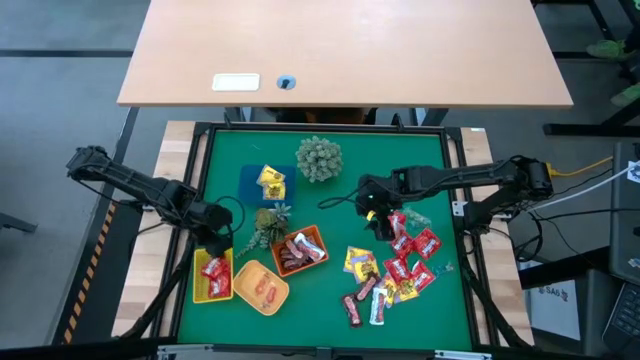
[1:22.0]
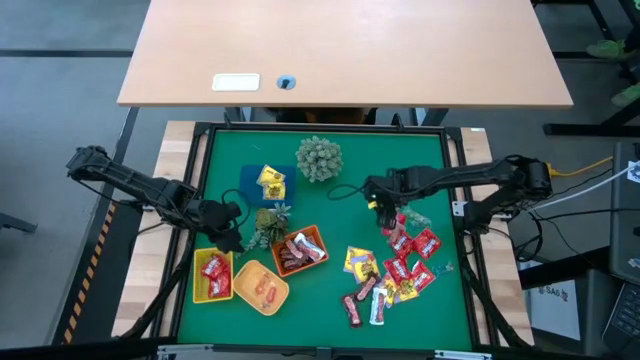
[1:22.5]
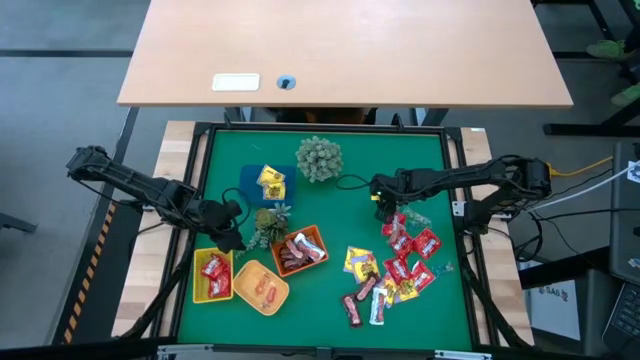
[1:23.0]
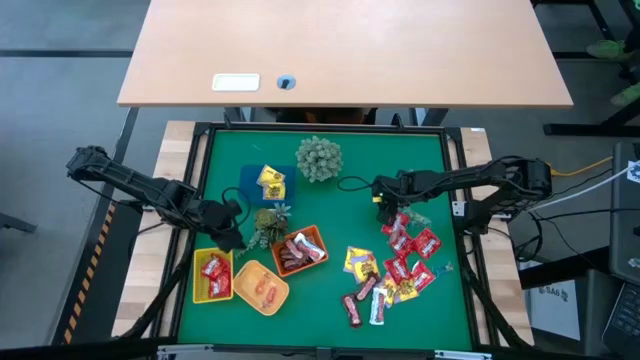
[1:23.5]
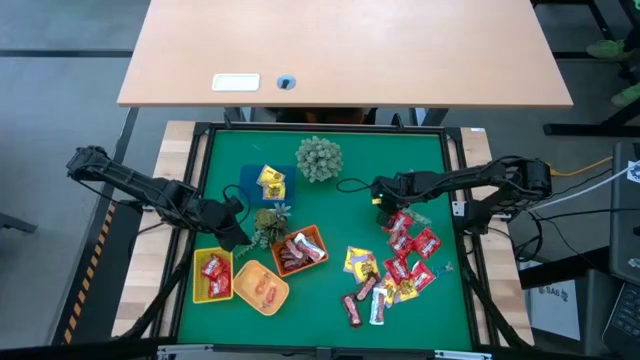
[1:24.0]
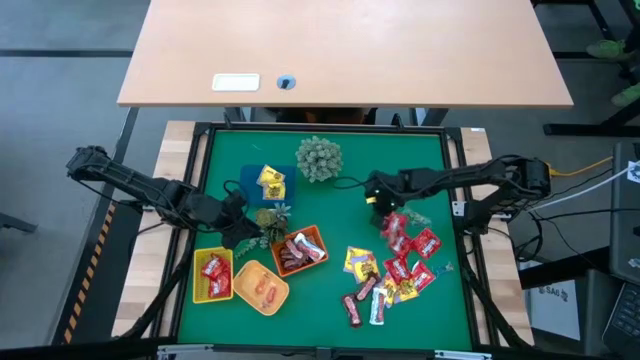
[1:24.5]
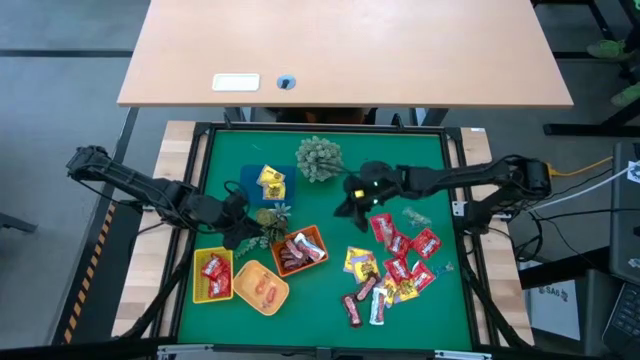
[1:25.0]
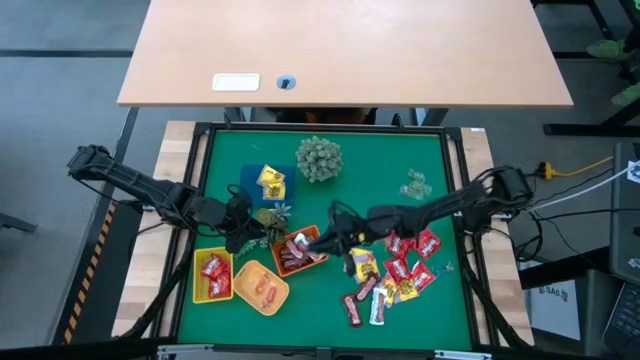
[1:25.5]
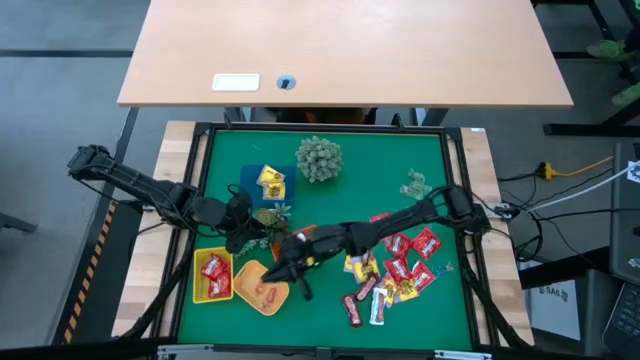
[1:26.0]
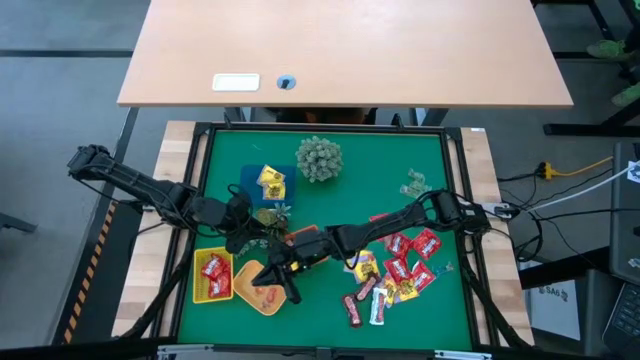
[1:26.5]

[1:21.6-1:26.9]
Task: Sort candy
Put the blue gummy into the light orange bin

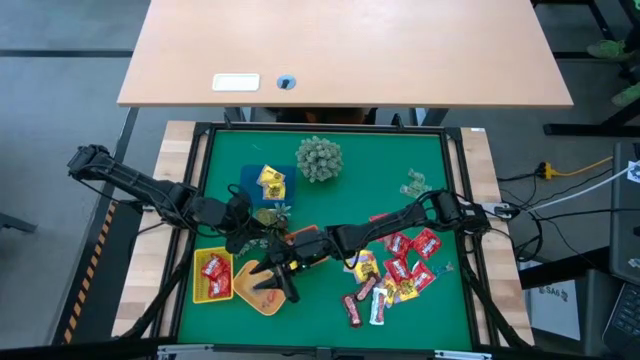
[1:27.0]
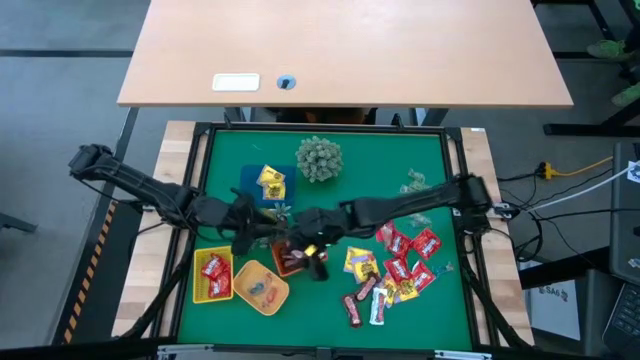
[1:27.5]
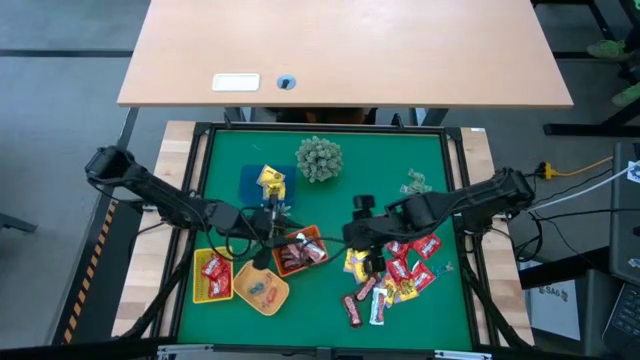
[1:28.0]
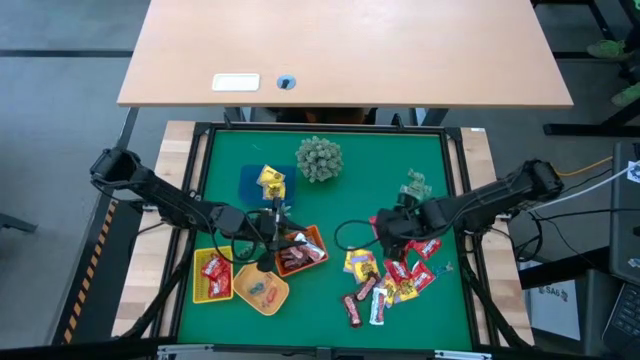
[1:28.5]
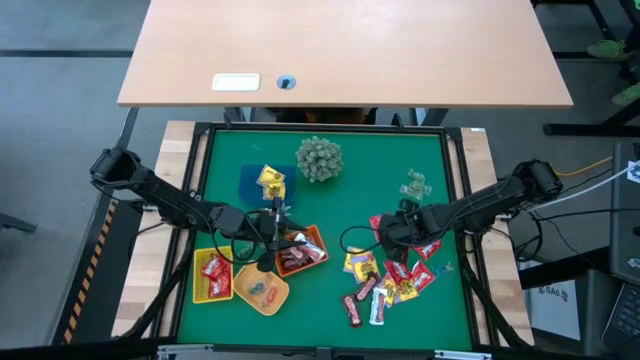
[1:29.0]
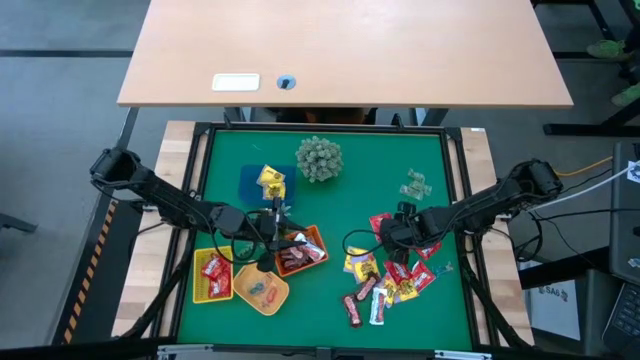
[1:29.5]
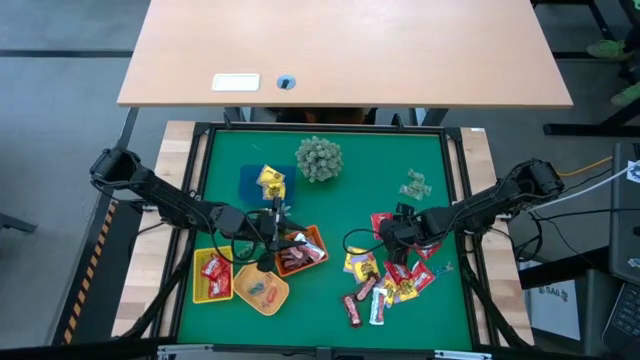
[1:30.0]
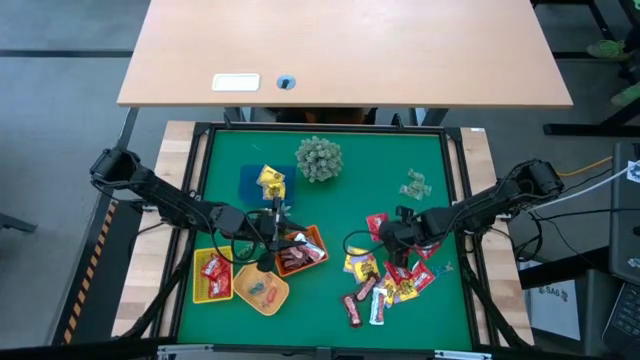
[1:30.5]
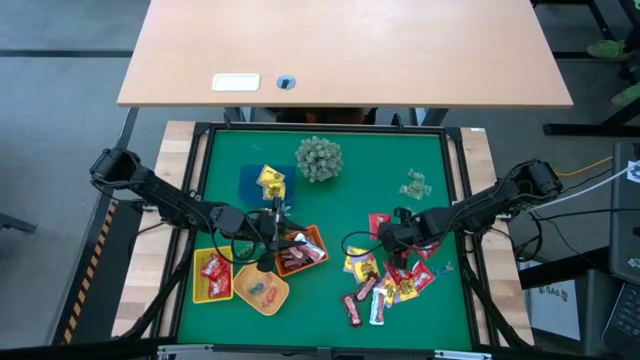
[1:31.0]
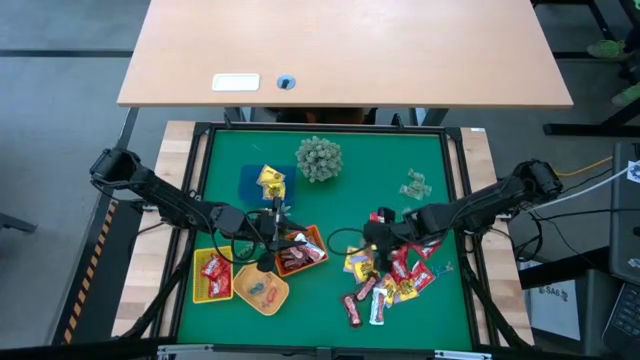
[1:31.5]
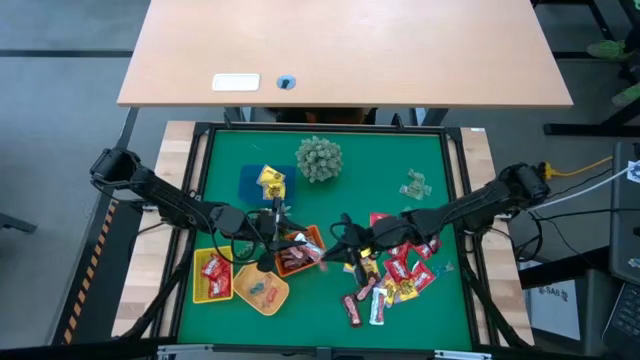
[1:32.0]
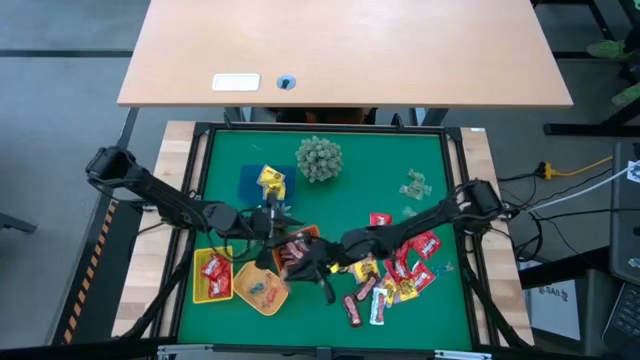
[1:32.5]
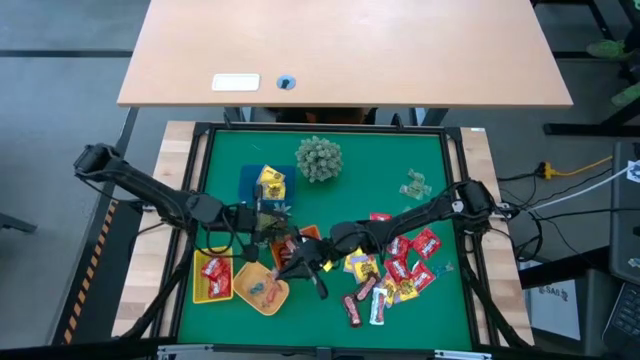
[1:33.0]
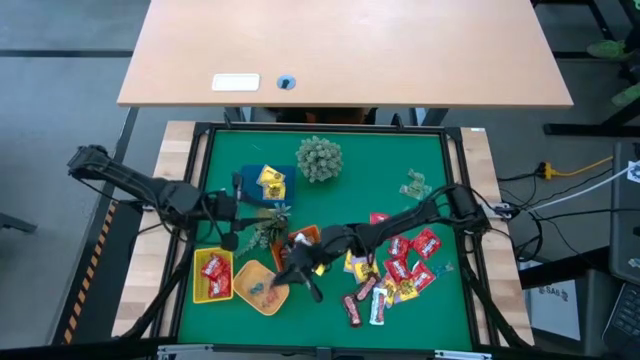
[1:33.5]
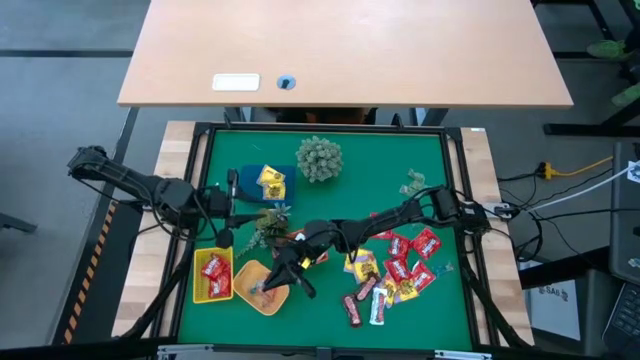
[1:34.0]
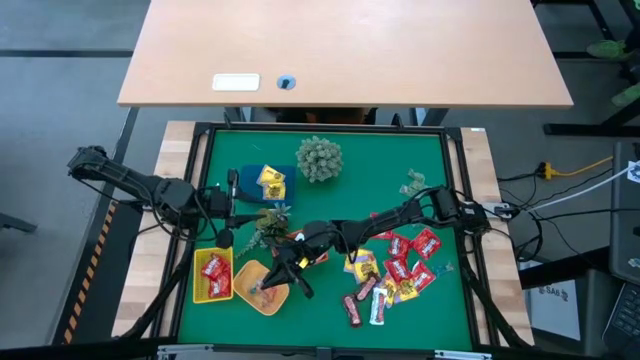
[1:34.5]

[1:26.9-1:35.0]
Put the orange gummy into the light orange bin

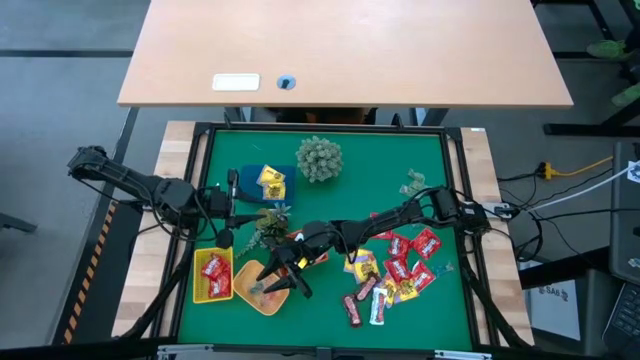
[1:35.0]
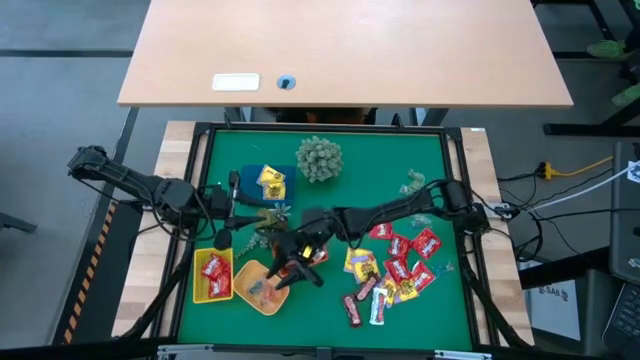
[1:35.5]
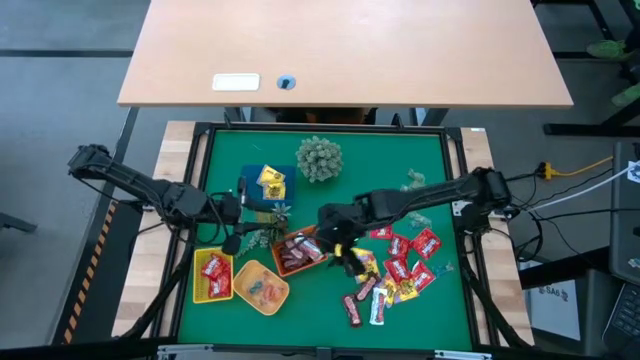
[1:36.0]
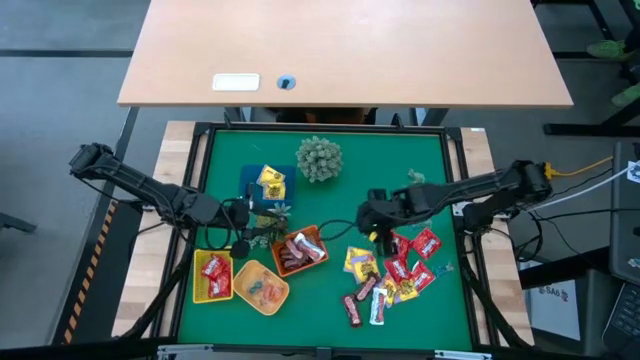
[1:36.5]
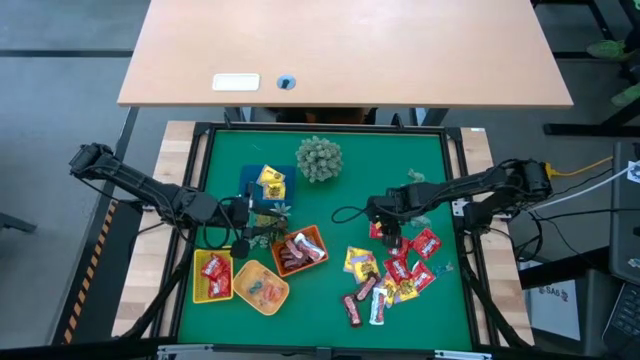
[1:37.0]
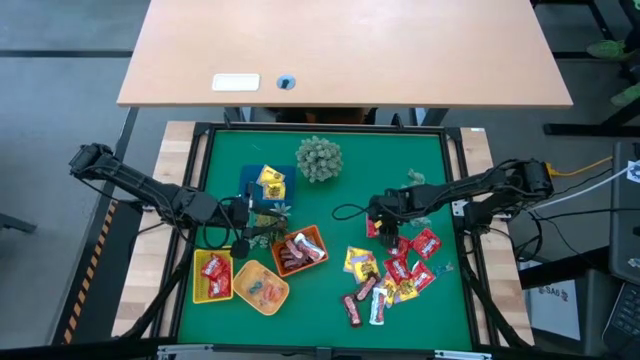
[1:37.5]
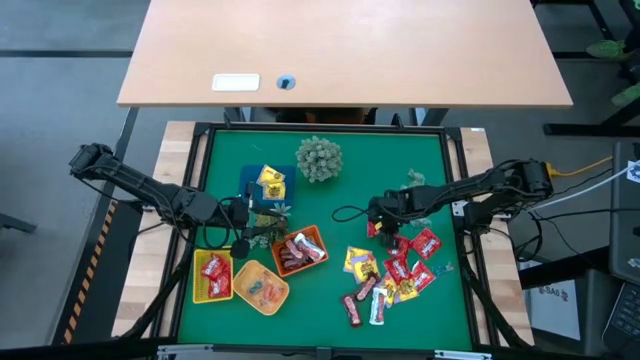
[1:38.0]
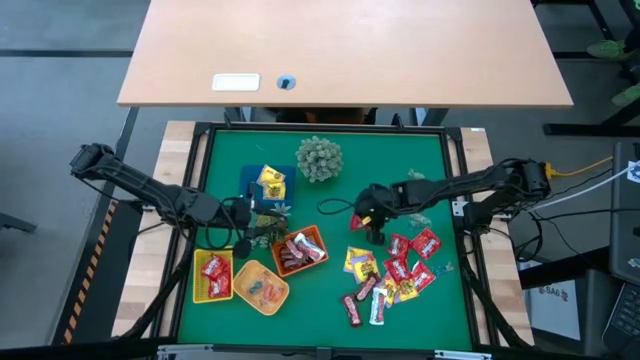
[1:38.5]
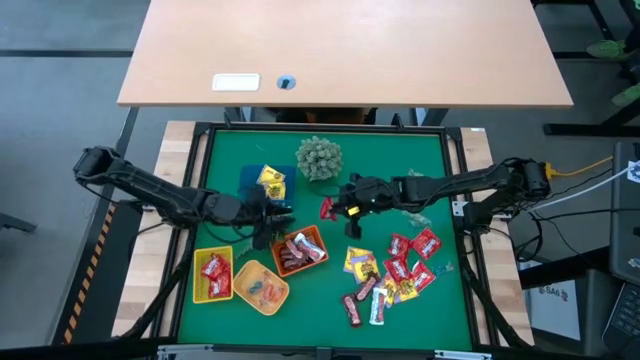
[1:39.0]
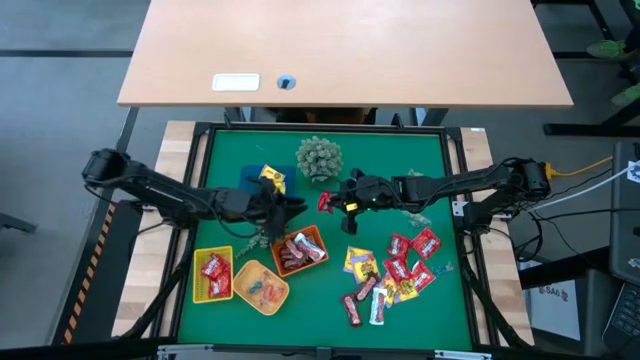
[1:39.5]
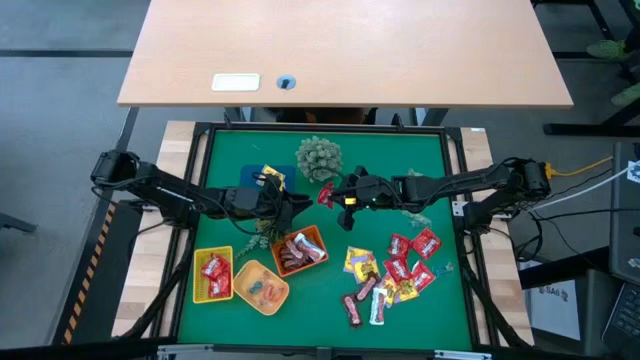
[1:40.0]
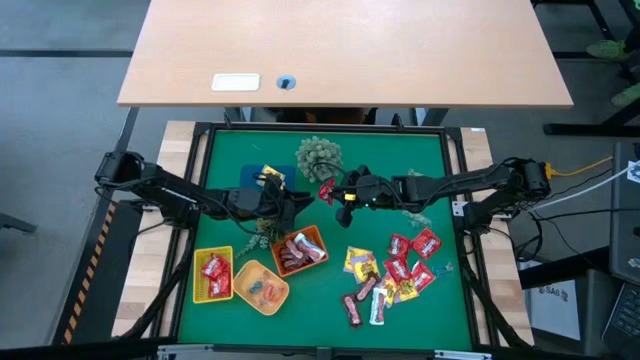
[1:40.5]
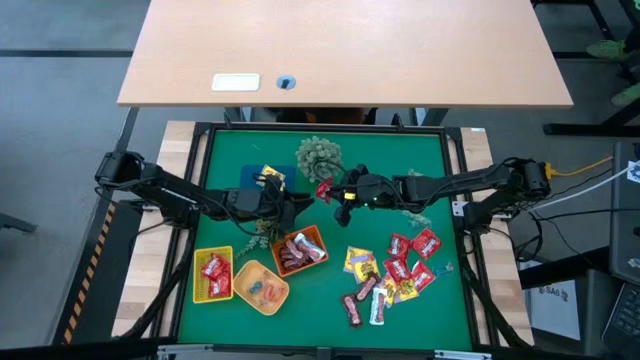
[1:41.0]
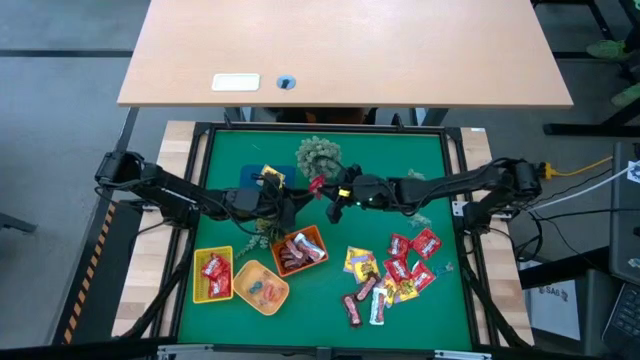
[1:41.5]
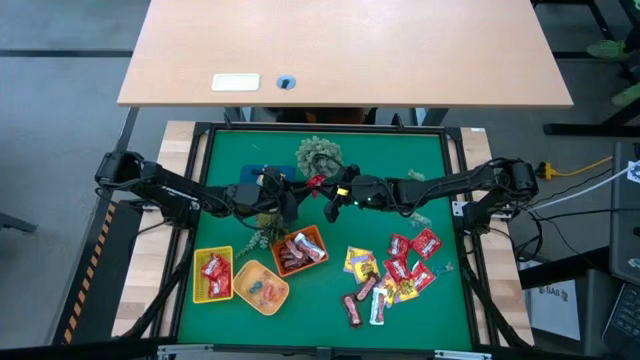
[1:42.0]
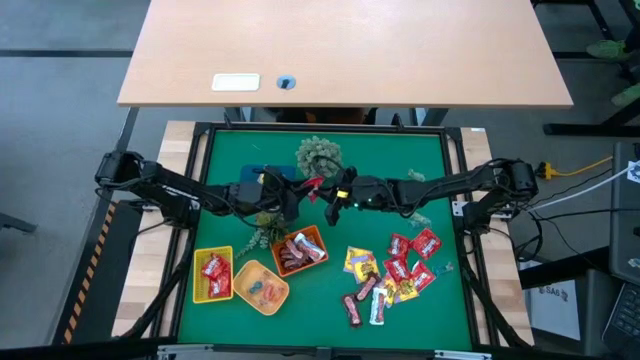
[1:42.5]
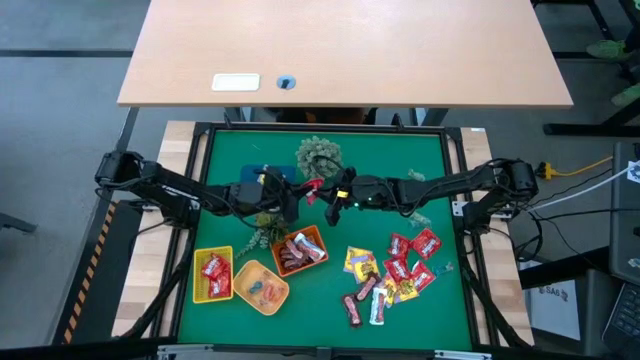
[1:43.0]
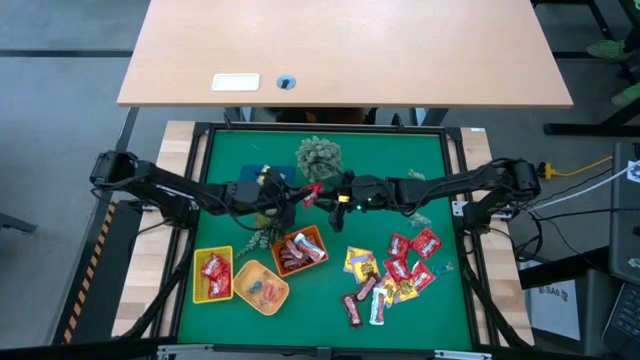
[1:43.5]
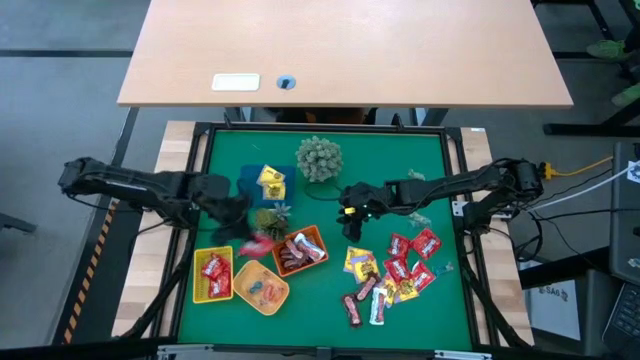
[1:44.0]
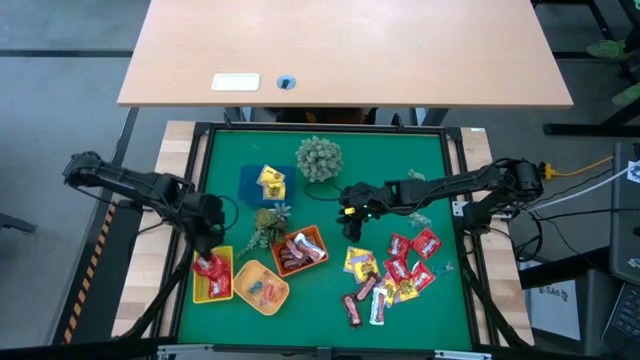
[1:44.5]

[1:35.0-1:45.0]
Put the red candy into the yellow bin
